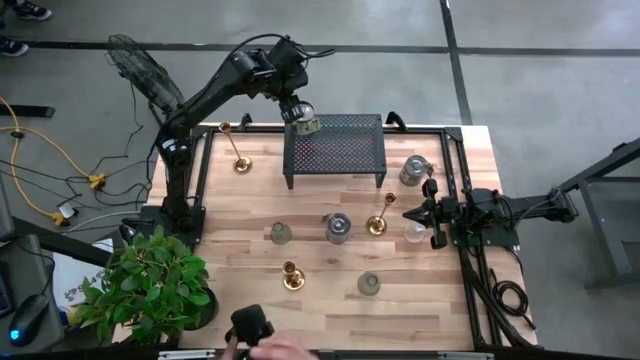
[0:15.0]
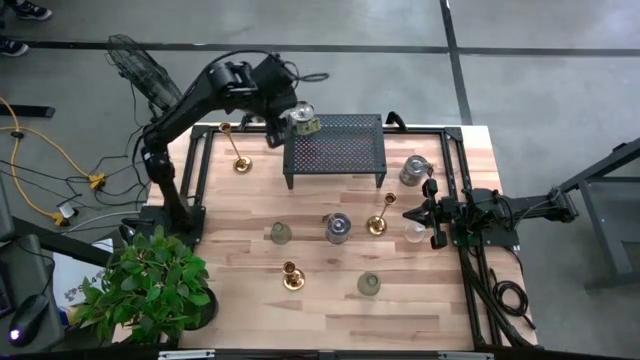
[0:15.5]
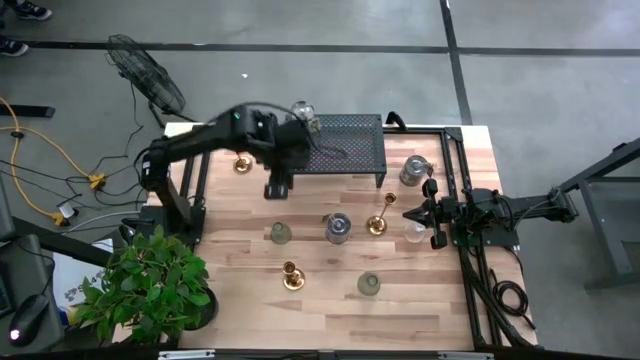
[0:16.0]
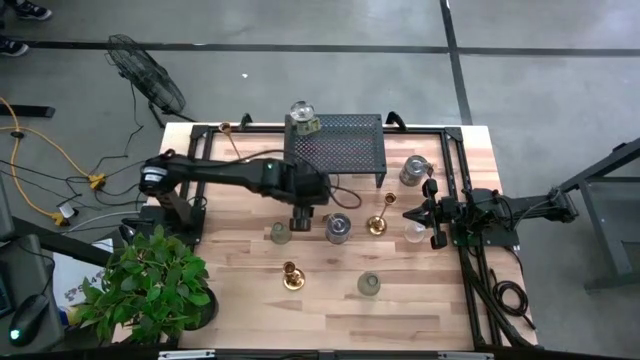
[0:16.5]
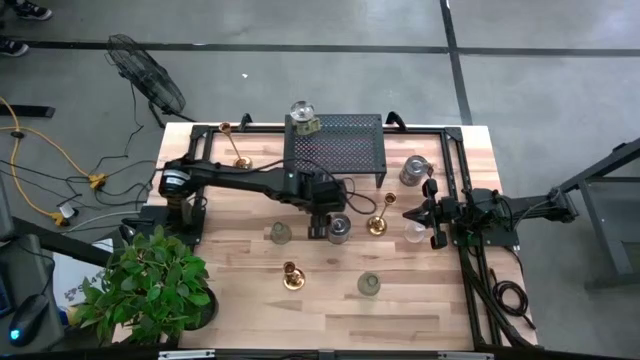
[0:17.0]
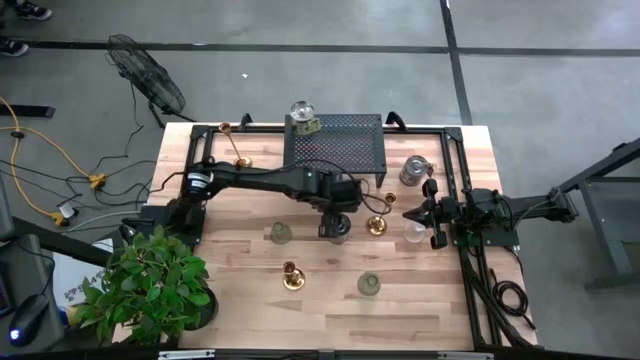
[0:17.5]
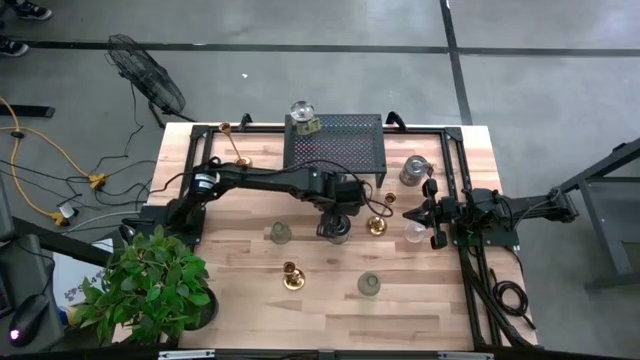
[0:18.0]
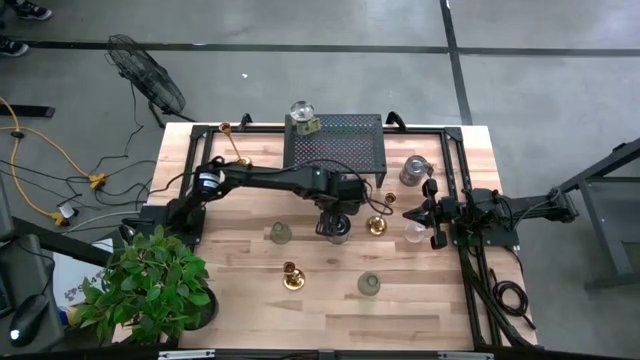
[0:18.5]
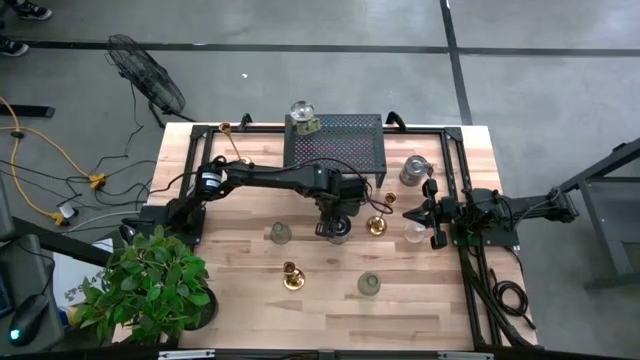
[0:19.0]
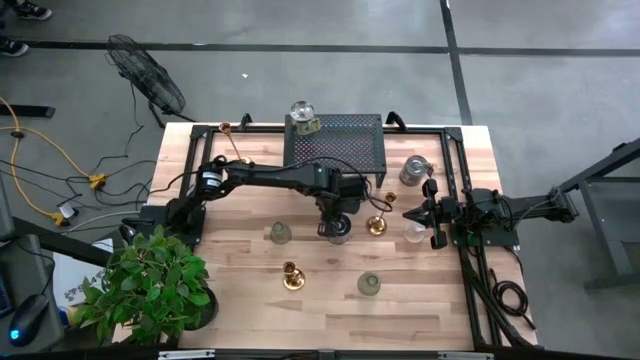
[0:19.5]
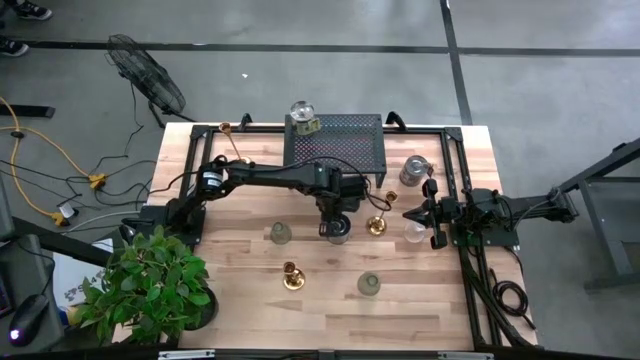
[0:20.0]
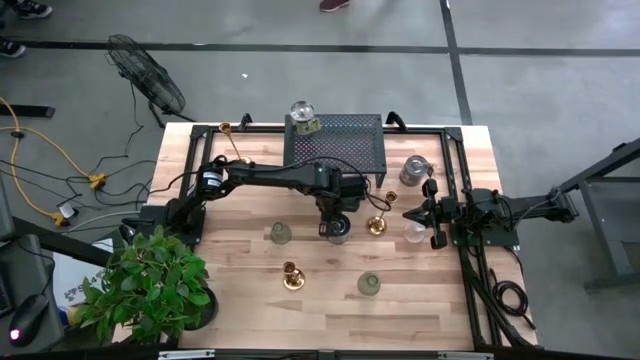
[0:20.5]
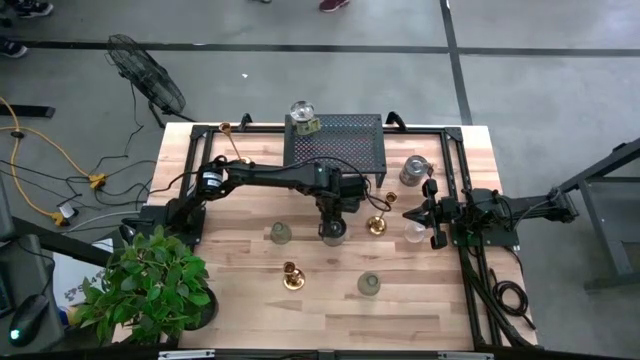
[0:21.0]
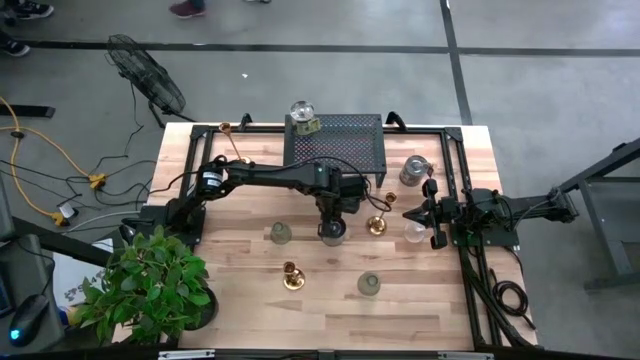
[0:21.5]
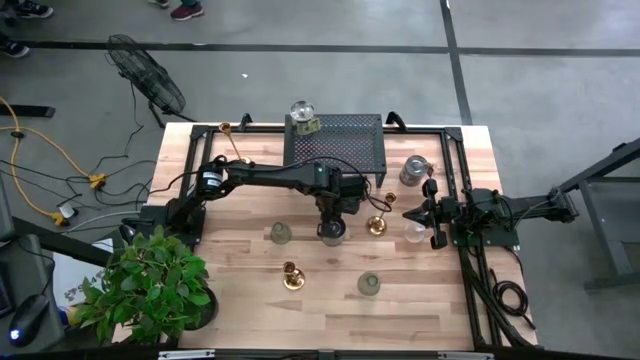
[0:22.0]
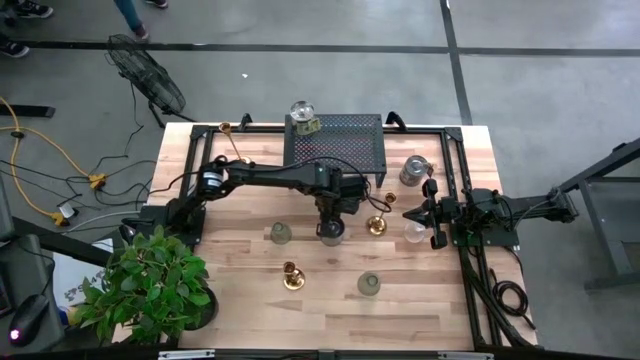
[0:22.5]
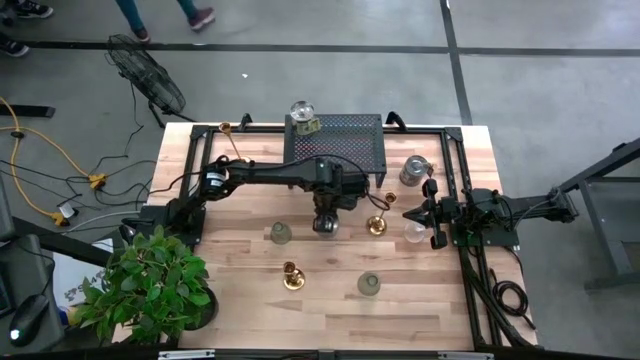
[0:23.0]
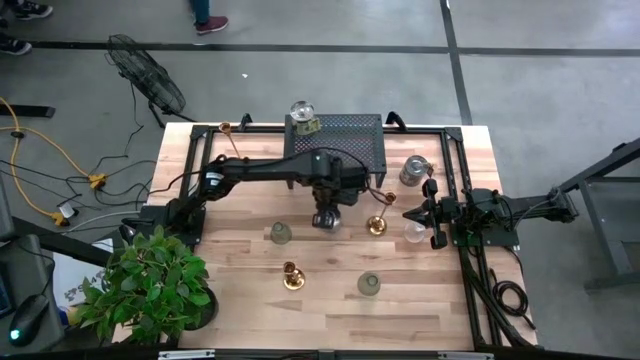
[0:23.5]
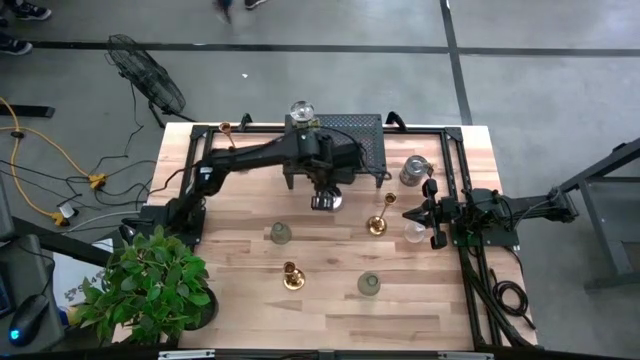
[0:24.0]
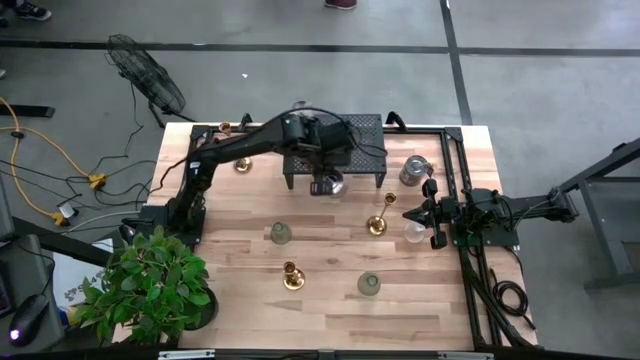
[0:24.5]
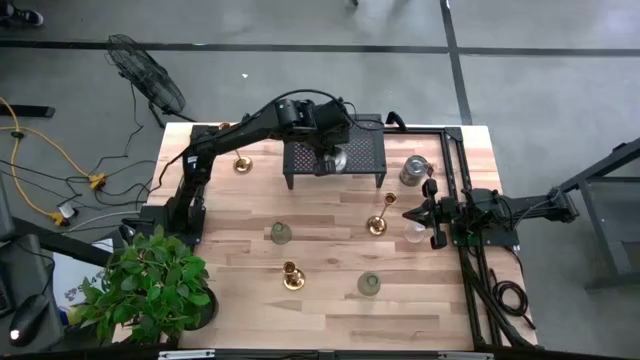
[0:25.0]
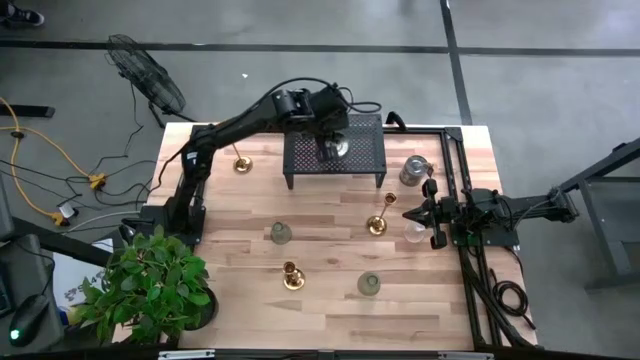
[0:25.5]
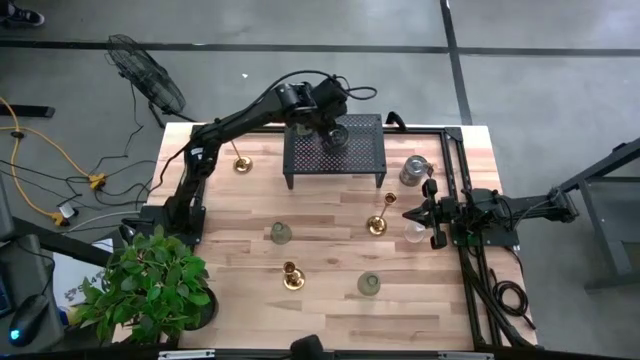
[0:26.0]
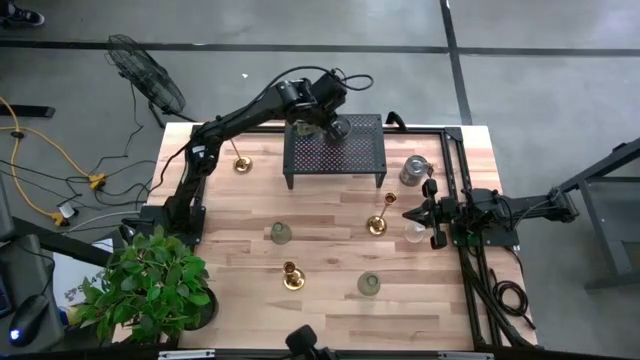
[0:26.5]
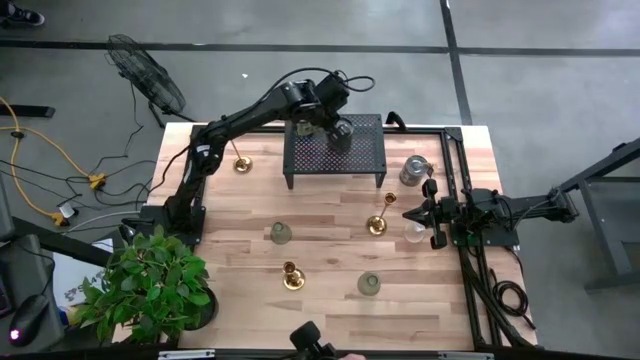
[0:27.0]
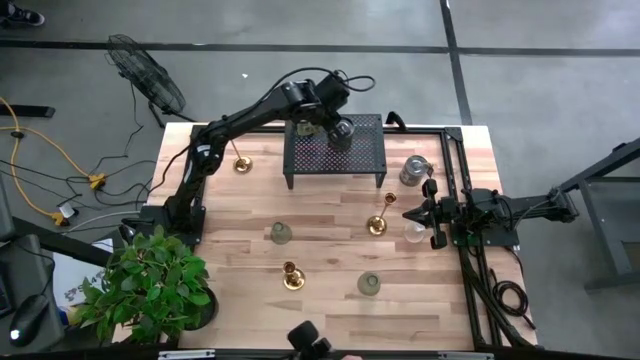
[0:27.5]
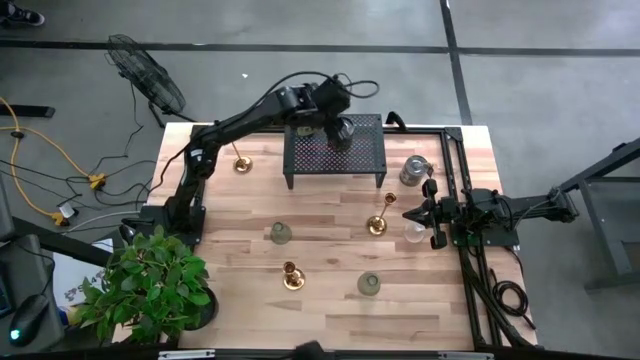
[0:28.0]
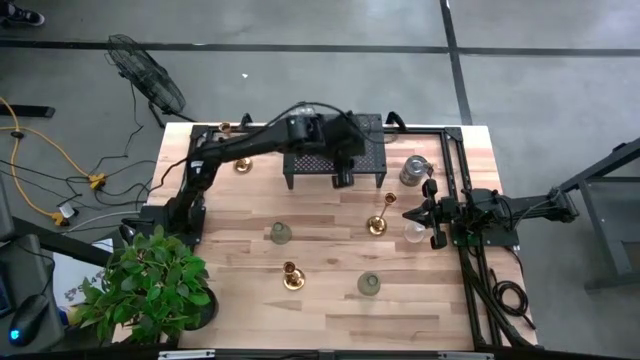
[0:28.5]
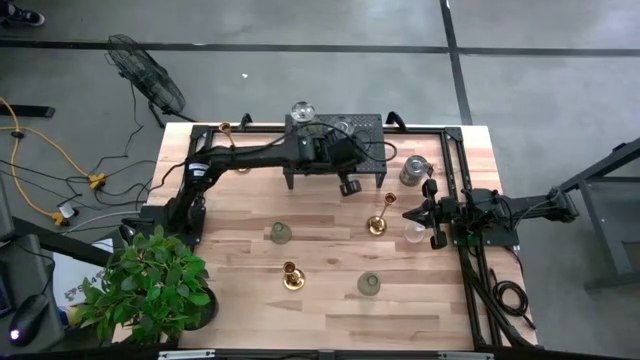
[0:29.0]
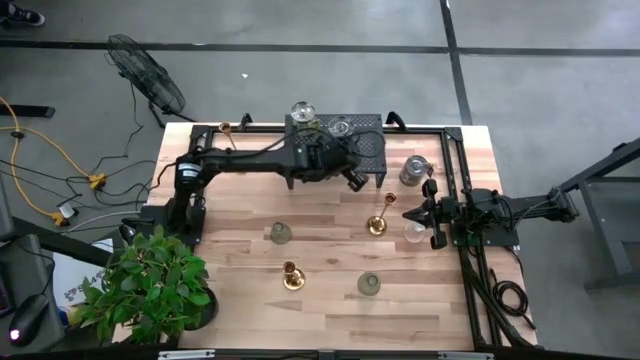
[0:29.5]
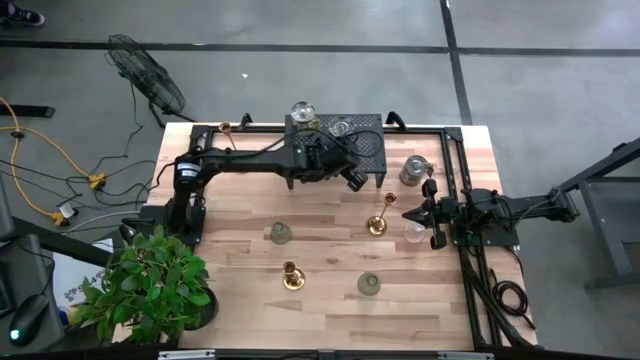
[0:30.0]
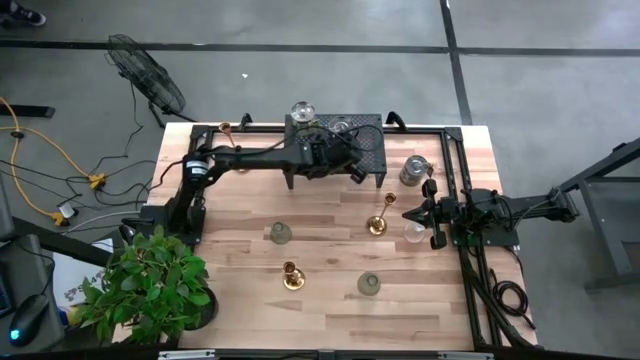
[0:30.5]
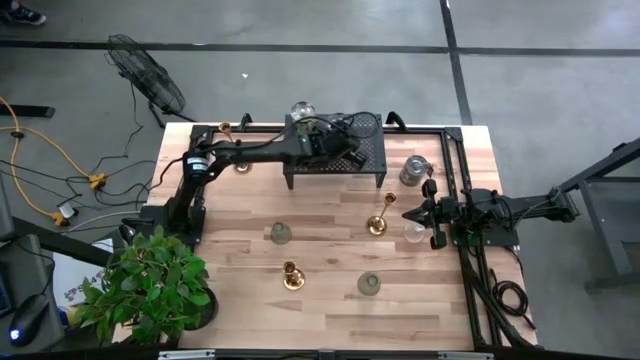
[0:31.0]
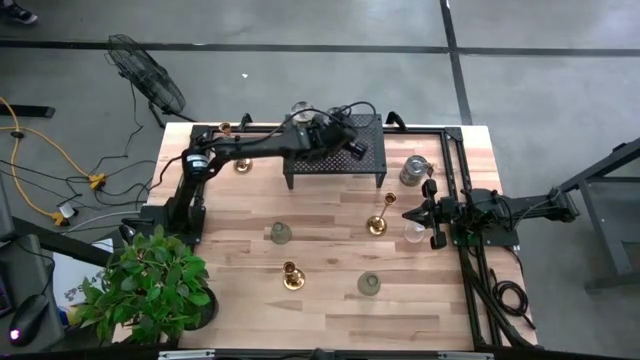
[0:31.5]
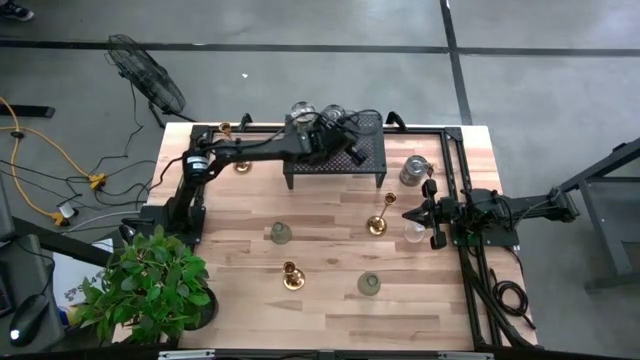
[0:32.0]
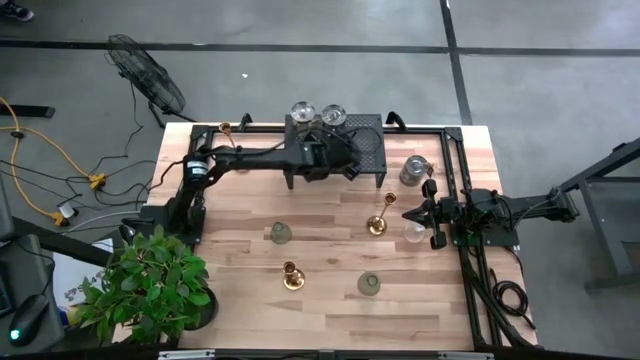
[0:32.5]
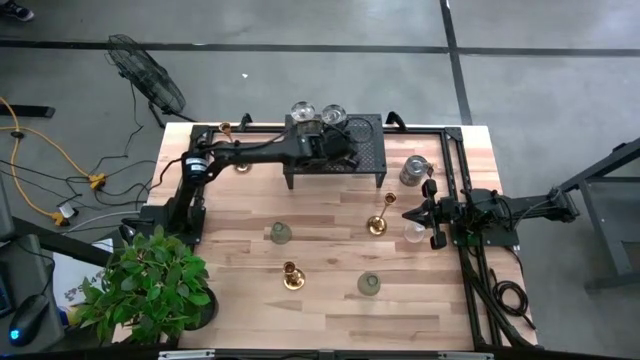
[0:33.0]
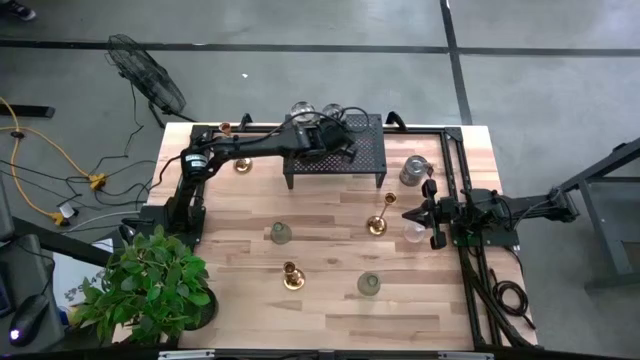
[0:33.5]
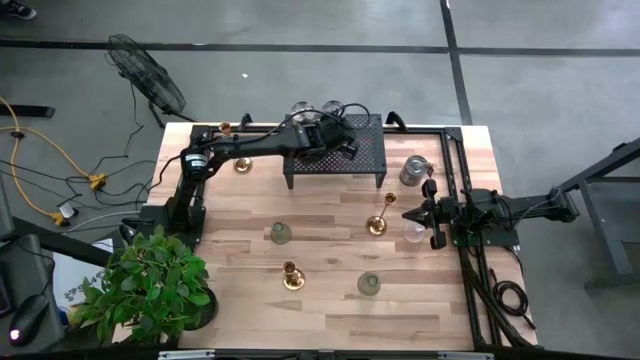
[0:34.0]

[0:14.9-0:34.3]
Task: Stock candles on shelf
Put the bottom scented candle on the shelf

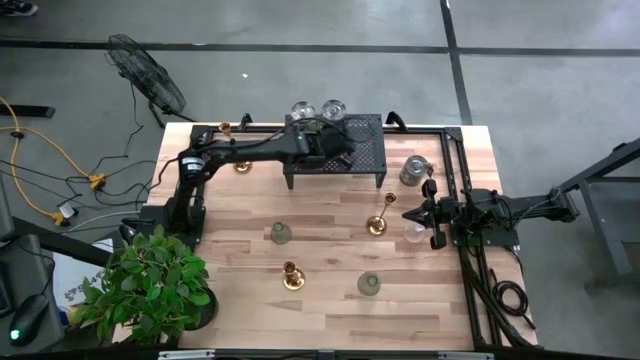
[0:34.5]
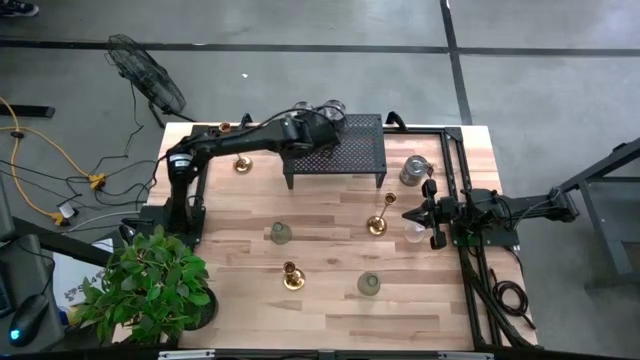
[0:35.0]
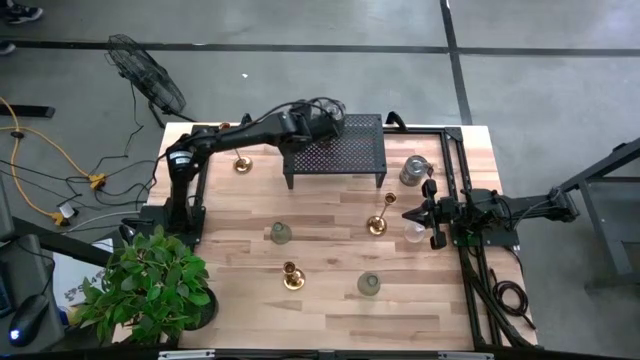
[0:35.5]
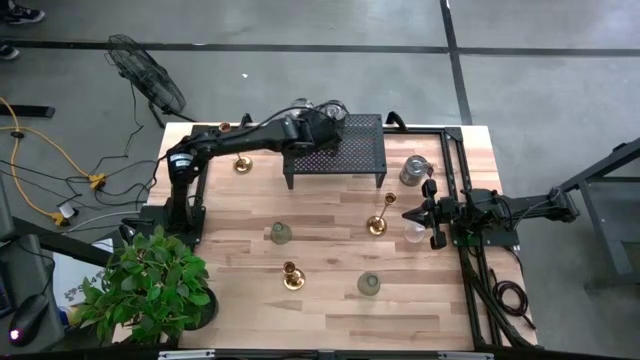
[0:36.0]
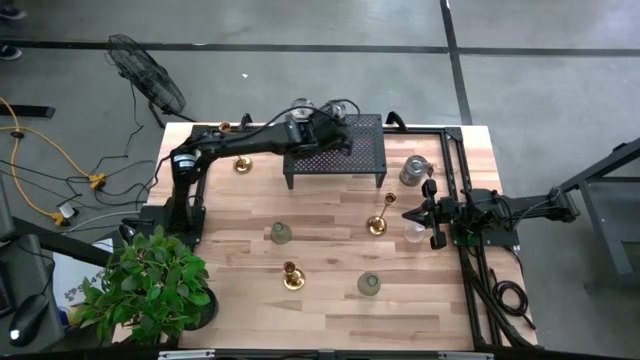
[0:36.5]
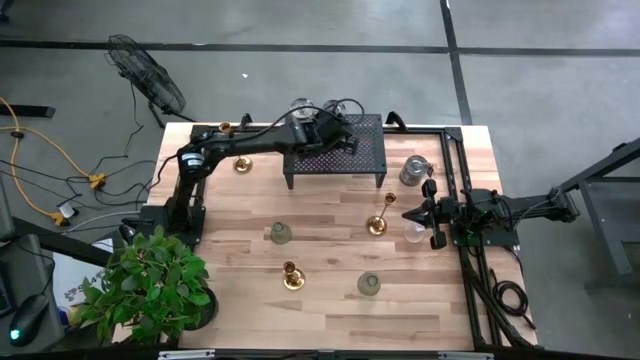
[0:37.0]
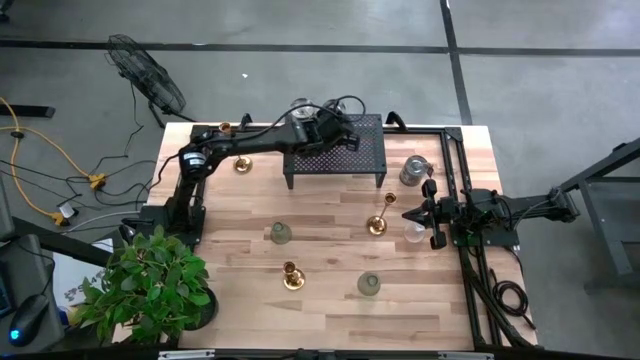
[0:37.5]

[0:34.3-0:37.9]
Adjust the silver scented candles on the shelf
